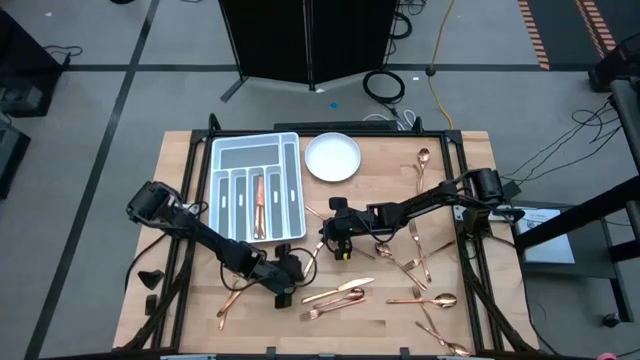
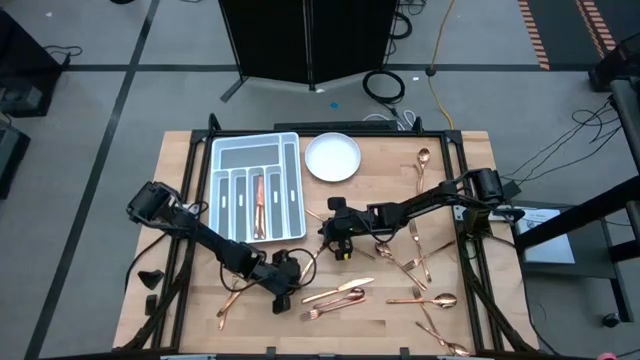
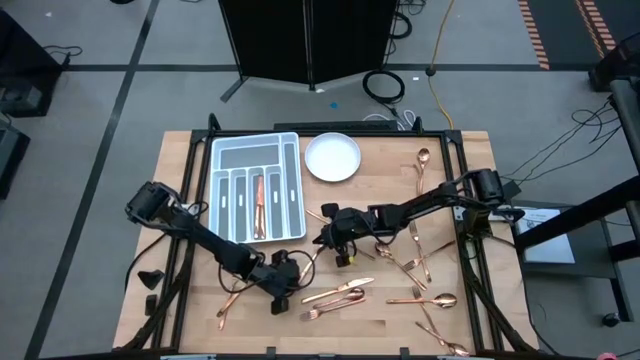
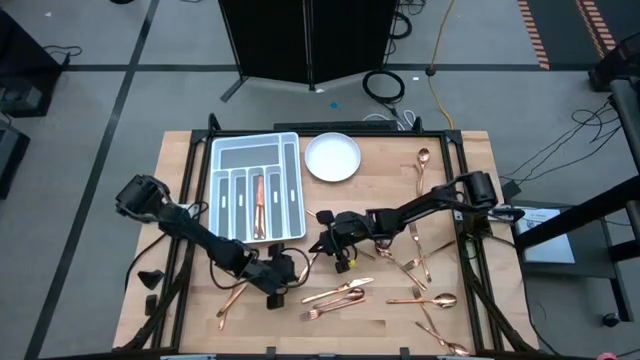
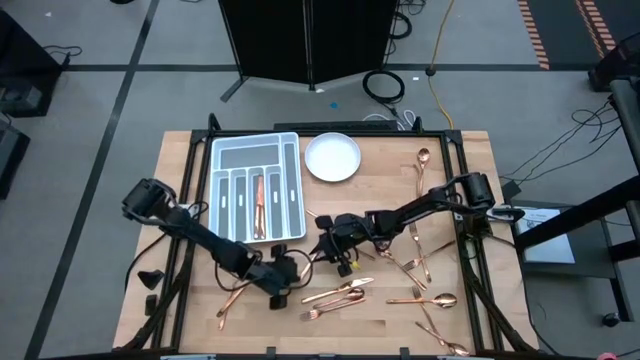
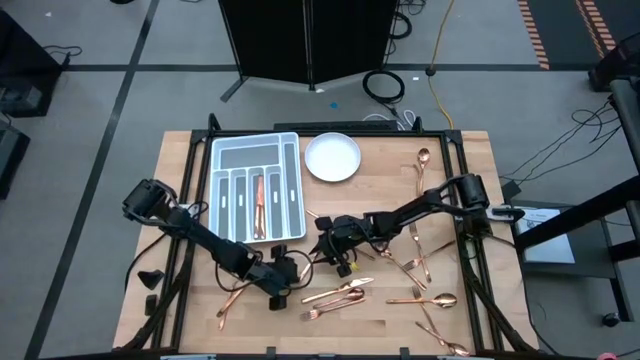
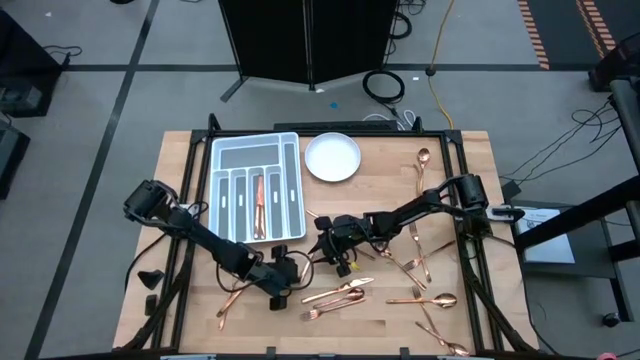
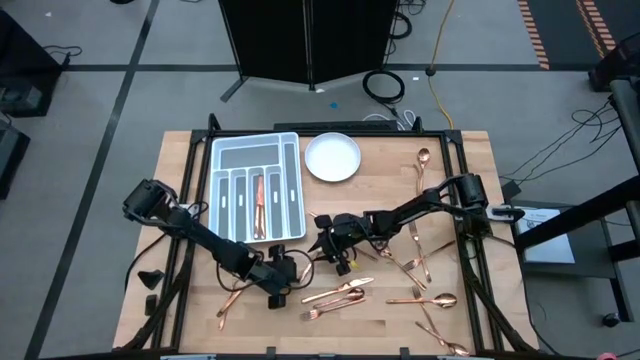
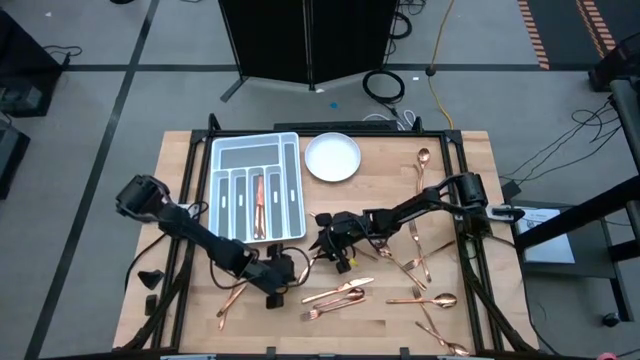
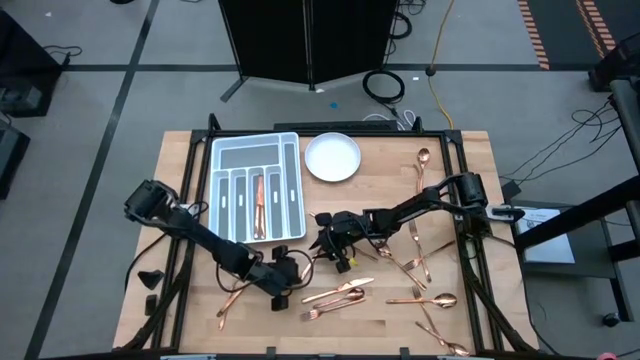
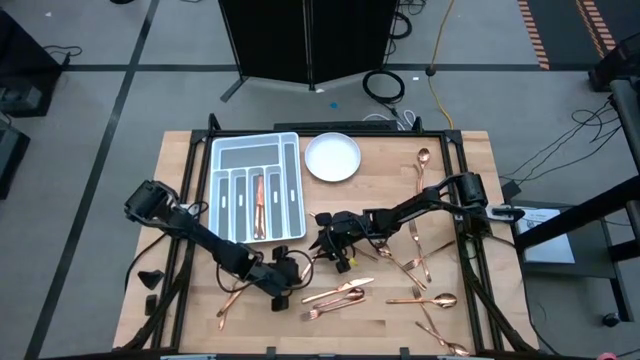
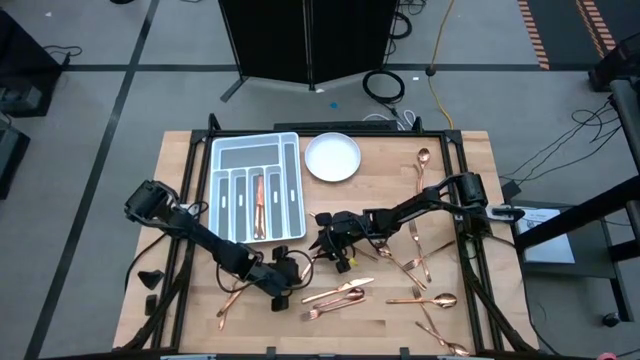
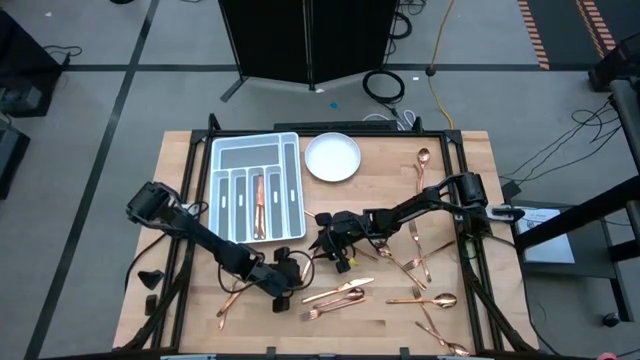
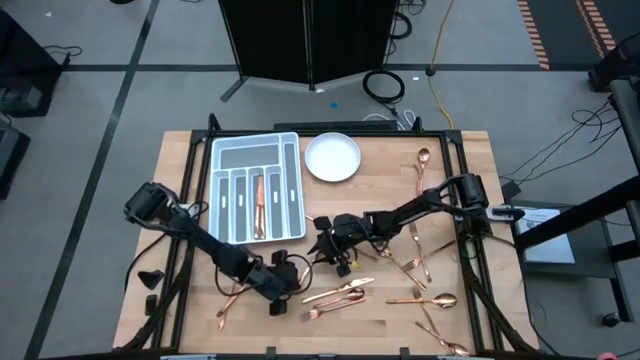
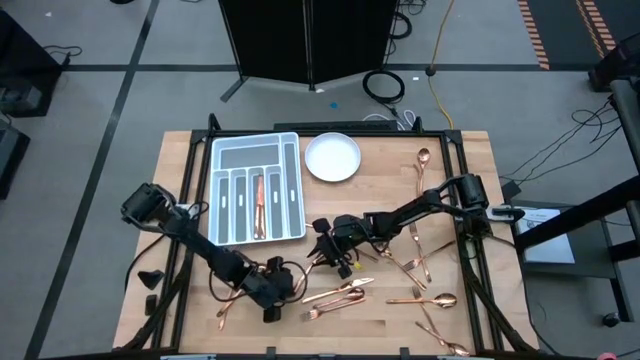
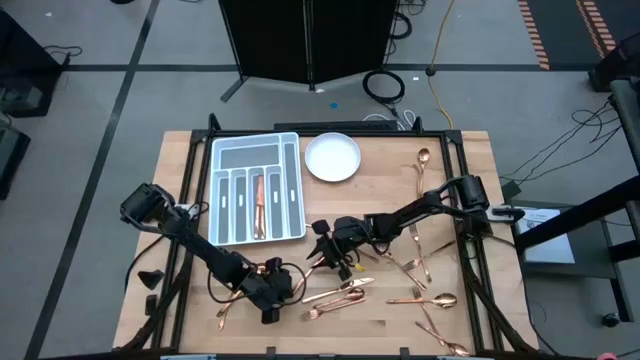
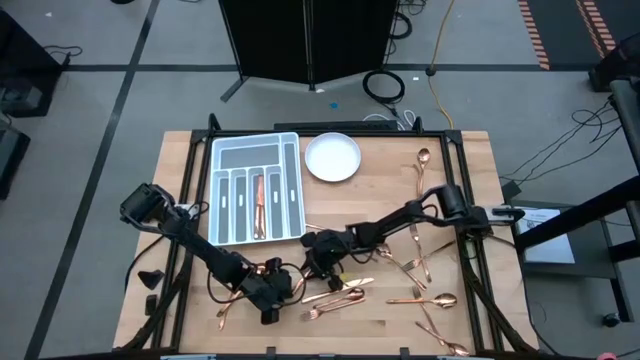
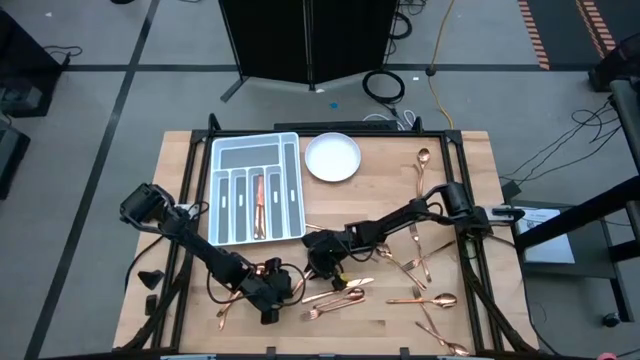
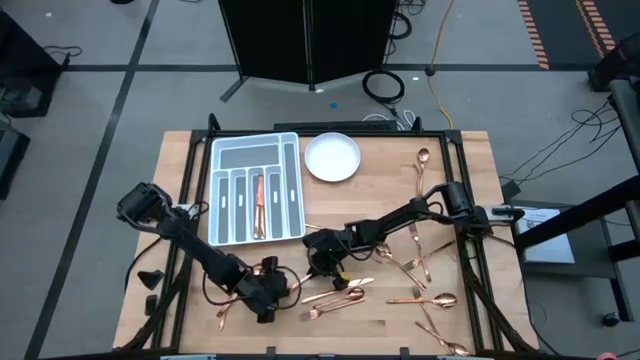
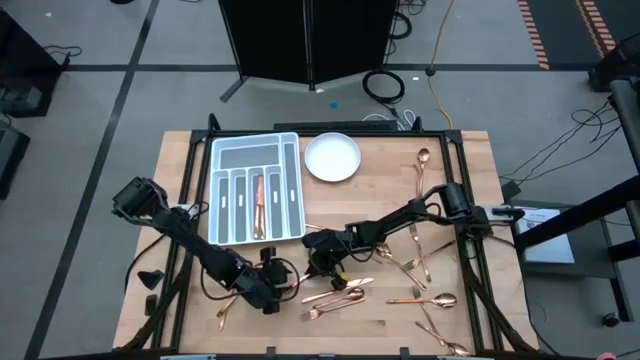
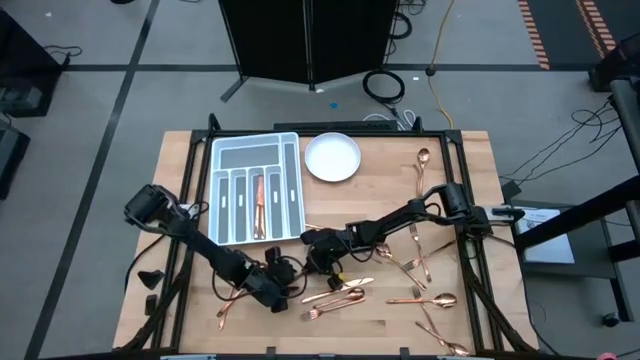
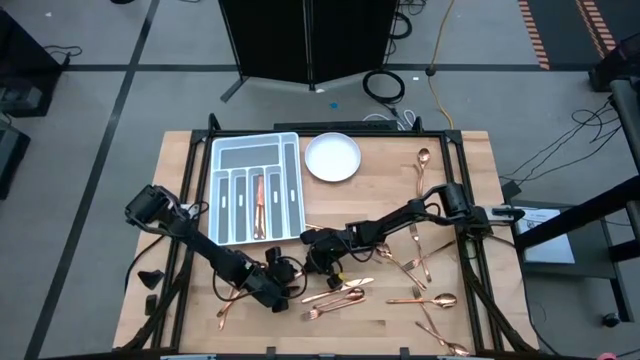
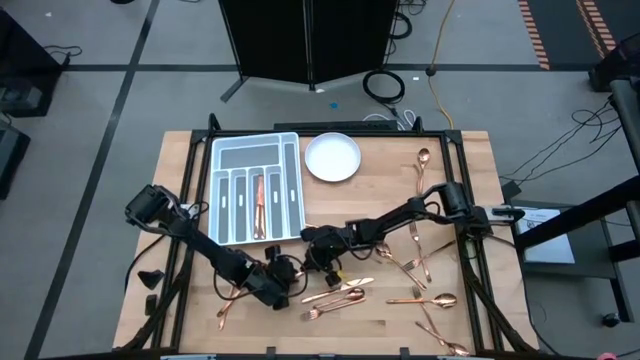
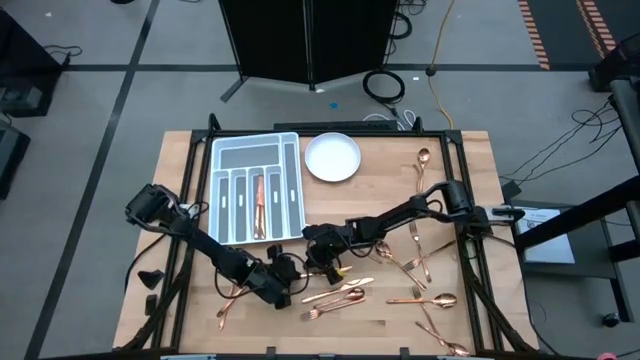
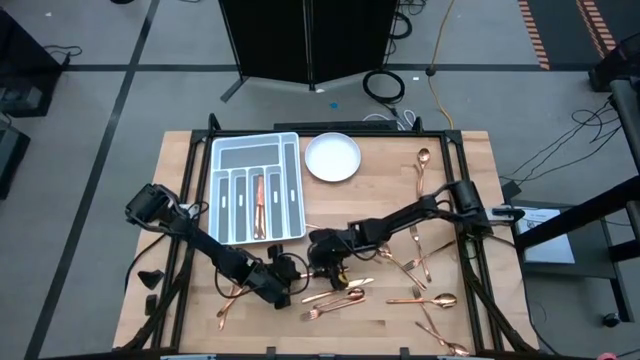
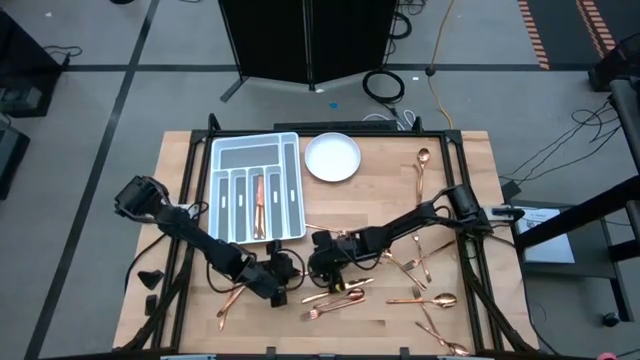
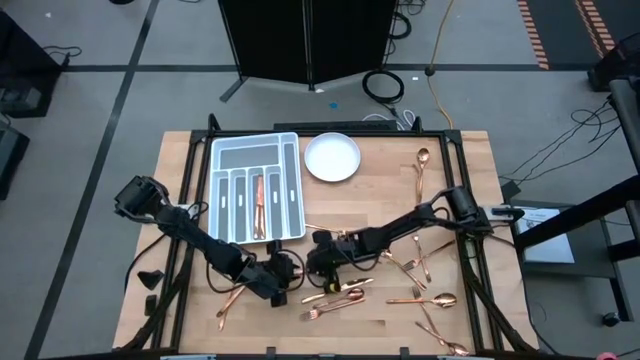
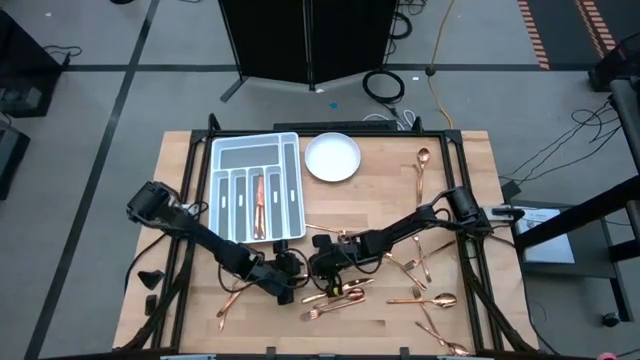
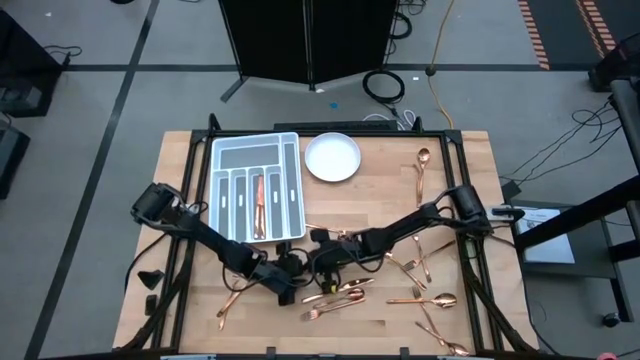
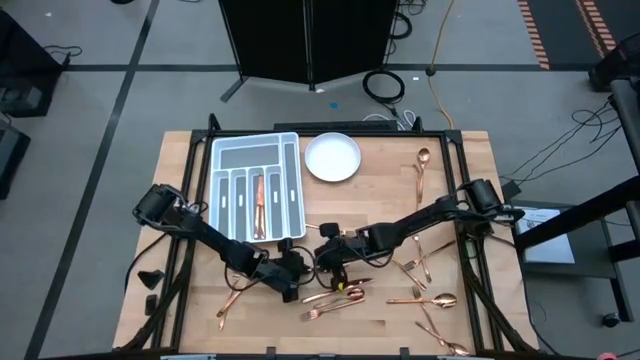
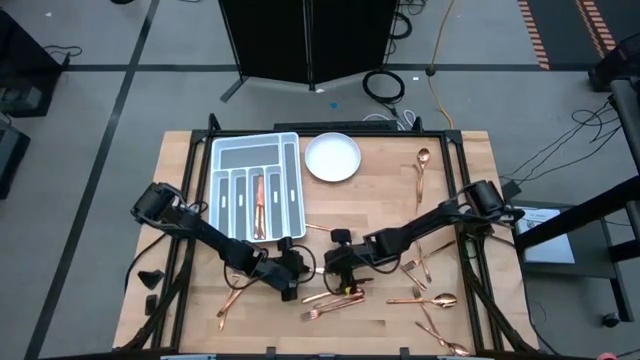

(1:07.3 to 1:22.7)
Task: Sort silverware
Put the knife on the utensil tray

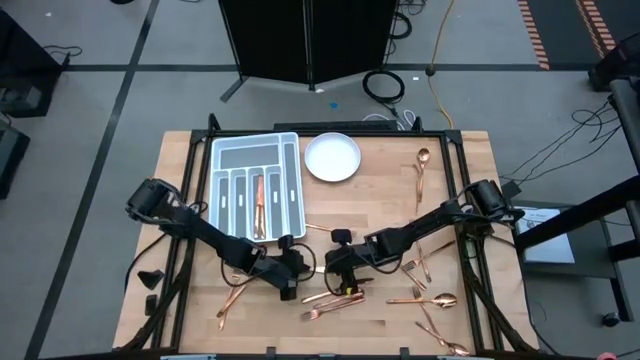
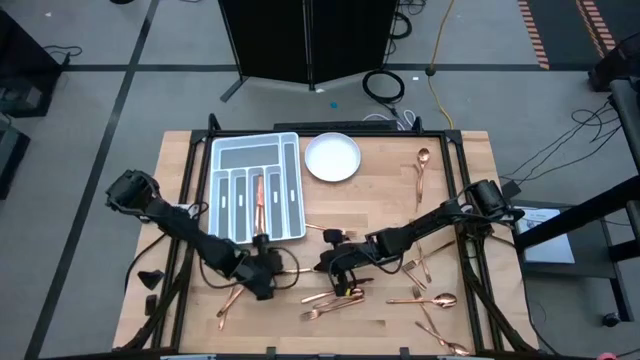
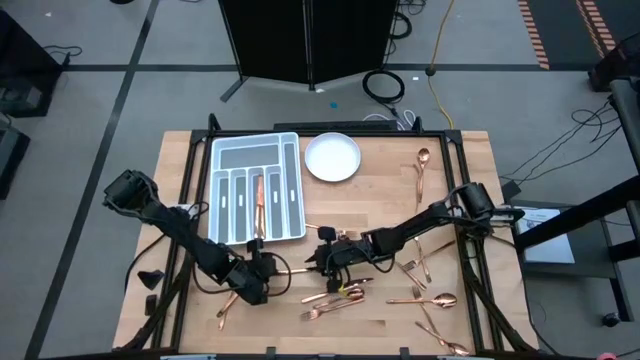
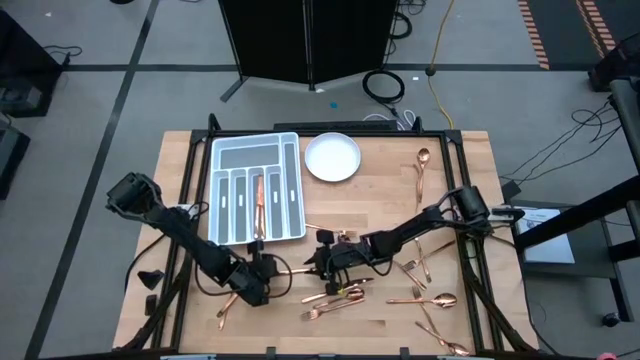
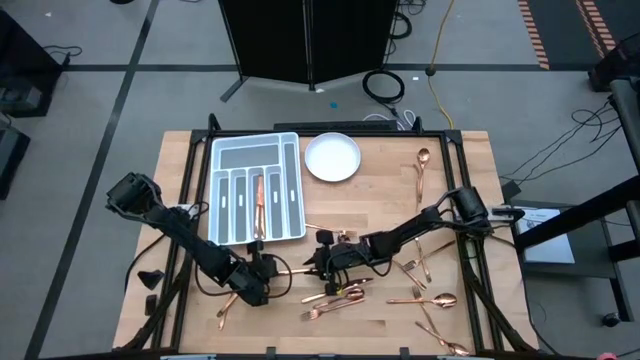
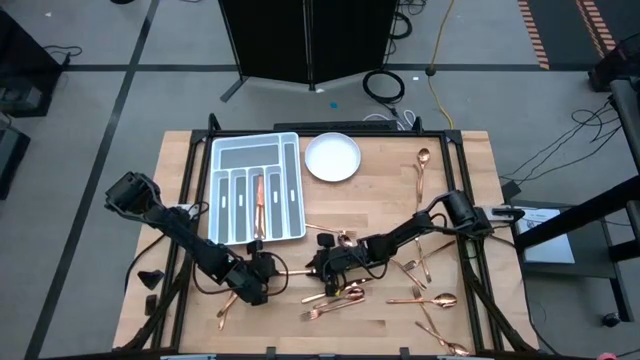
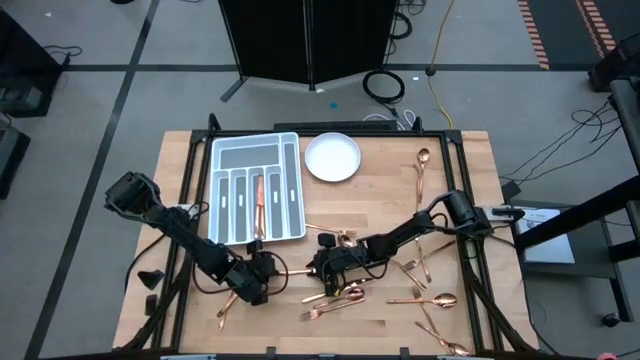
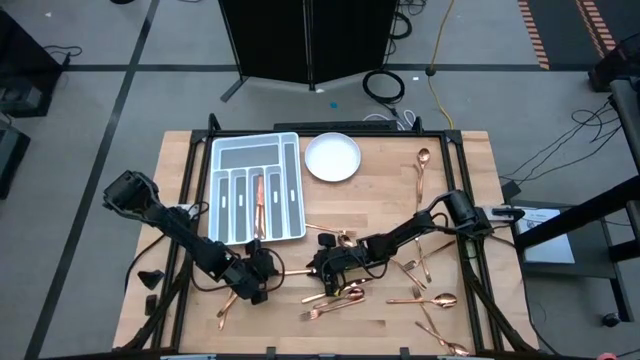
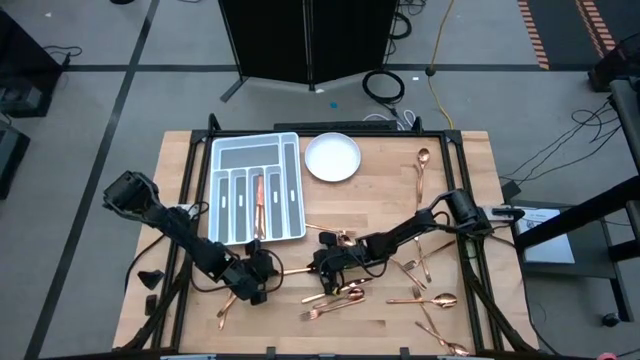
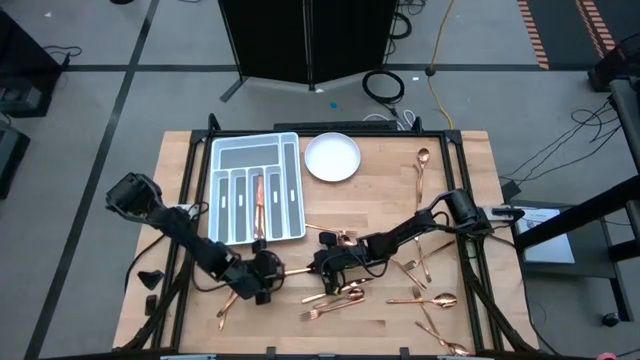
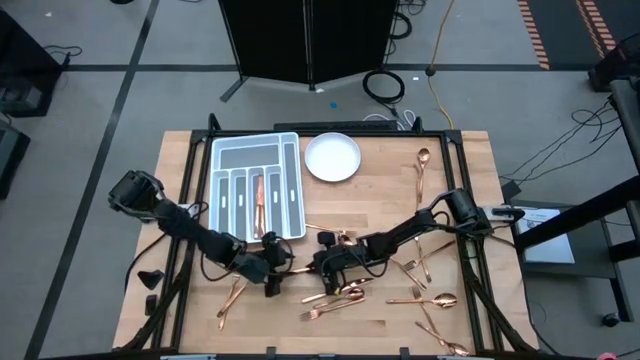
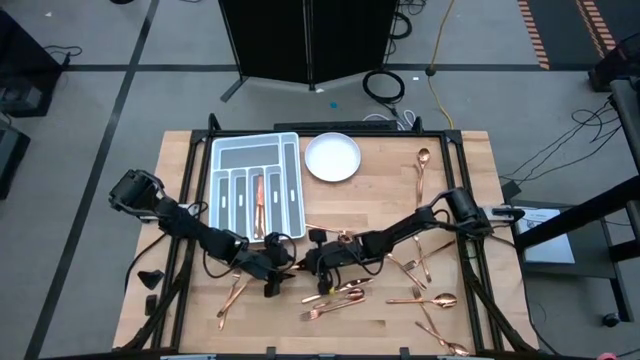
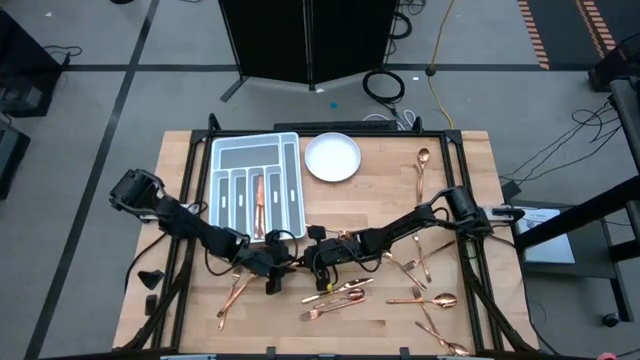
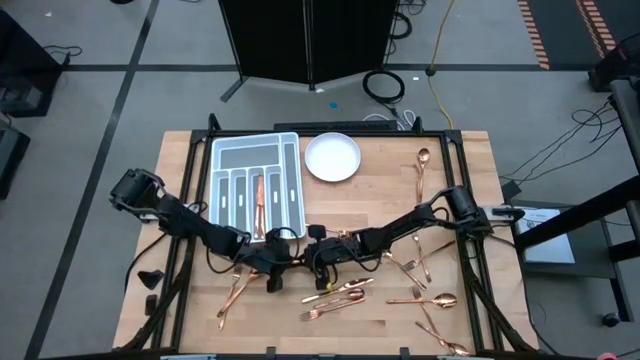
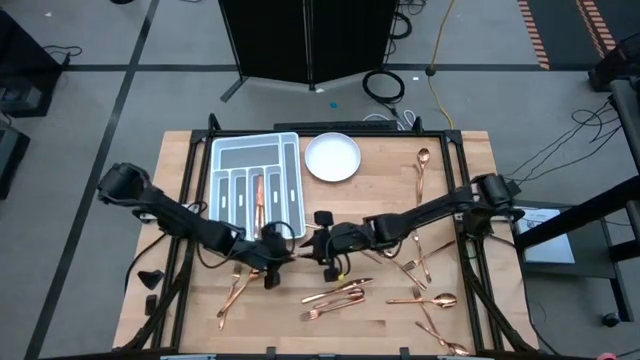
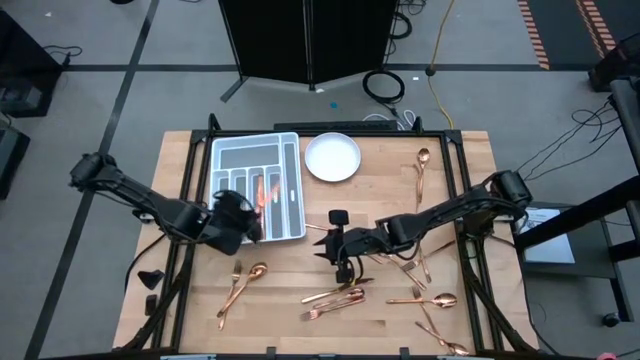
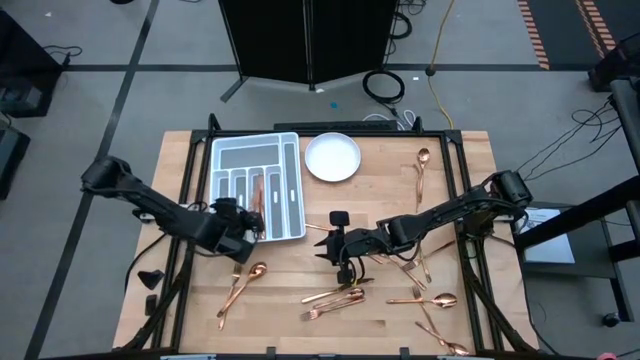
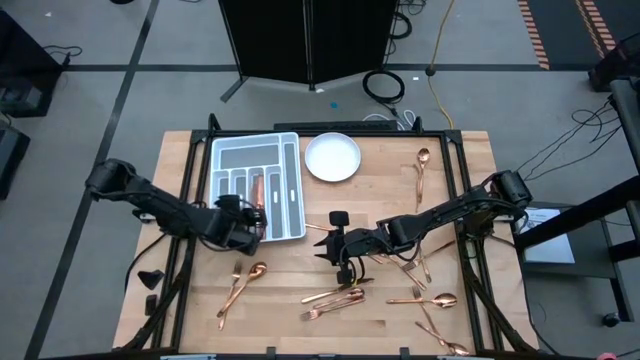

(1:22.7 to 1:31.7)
Put the knife on the silverware tray
